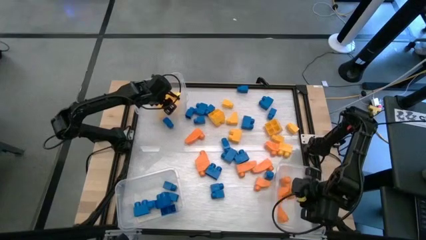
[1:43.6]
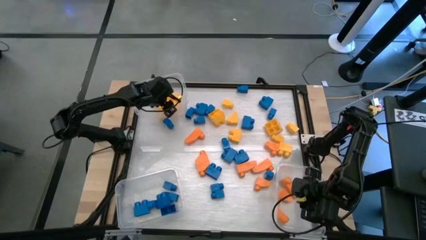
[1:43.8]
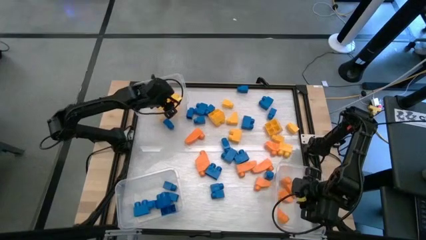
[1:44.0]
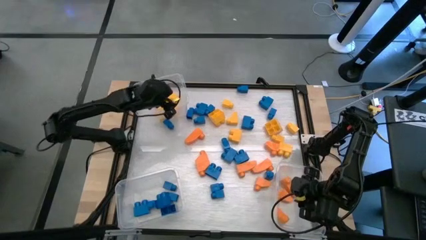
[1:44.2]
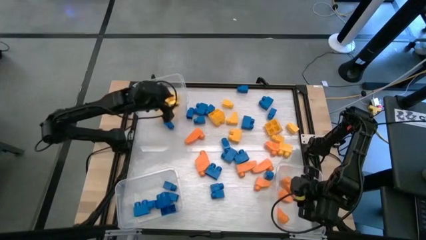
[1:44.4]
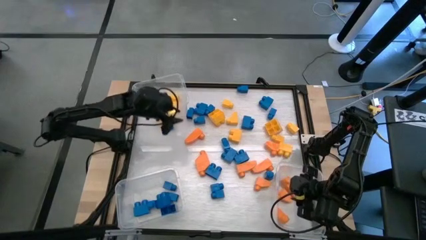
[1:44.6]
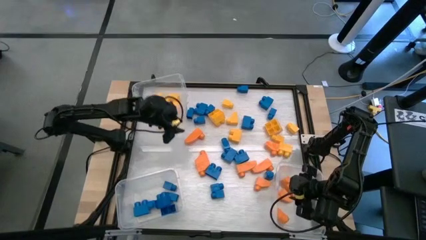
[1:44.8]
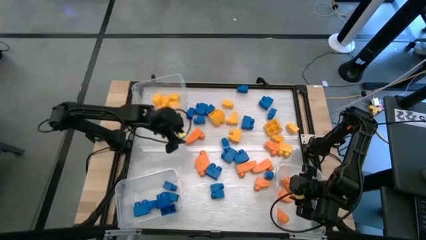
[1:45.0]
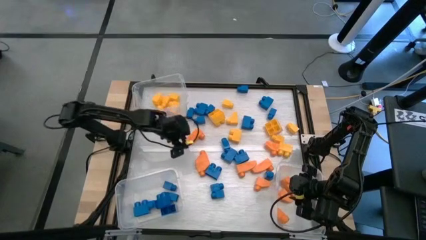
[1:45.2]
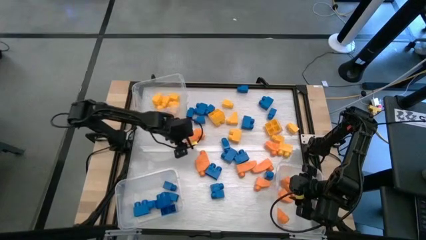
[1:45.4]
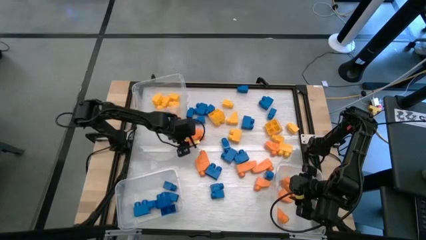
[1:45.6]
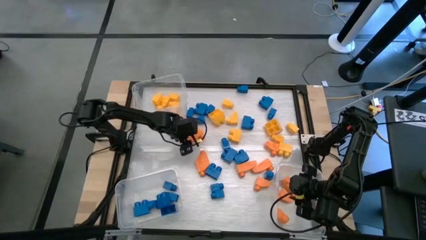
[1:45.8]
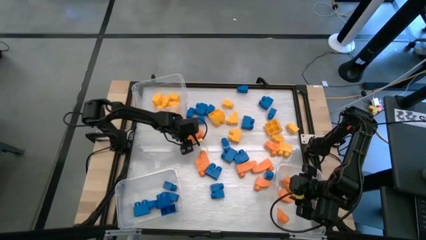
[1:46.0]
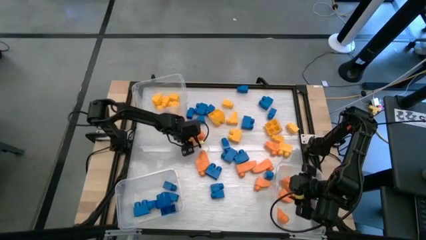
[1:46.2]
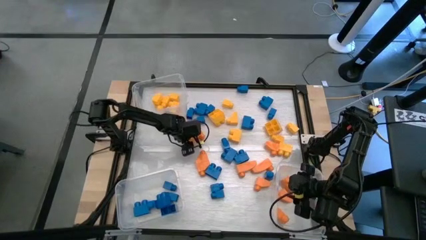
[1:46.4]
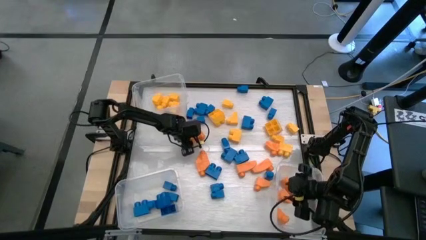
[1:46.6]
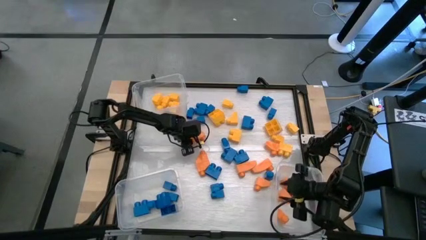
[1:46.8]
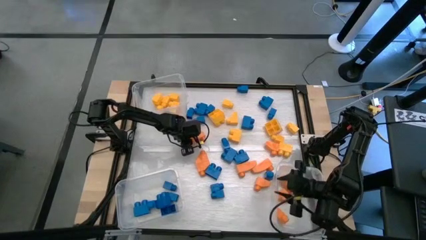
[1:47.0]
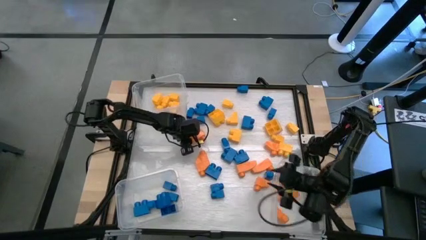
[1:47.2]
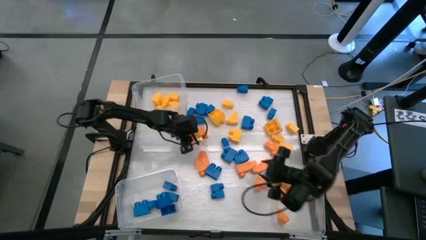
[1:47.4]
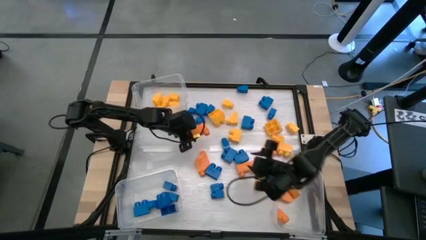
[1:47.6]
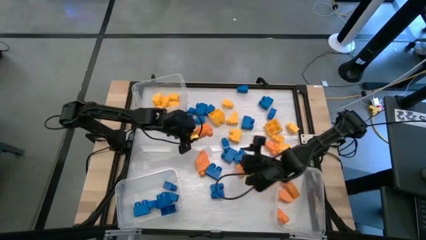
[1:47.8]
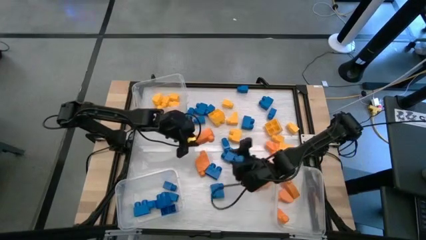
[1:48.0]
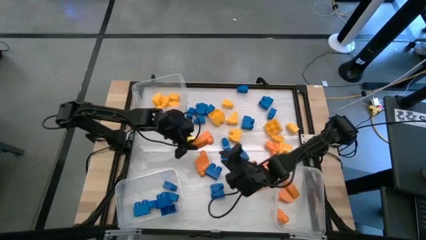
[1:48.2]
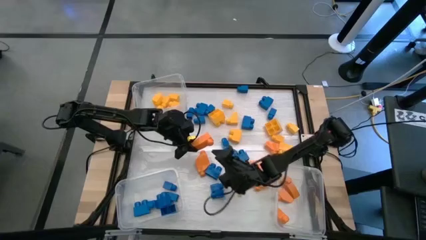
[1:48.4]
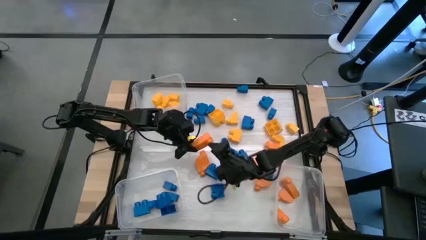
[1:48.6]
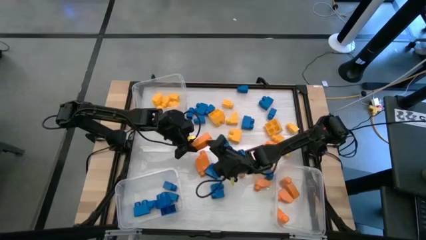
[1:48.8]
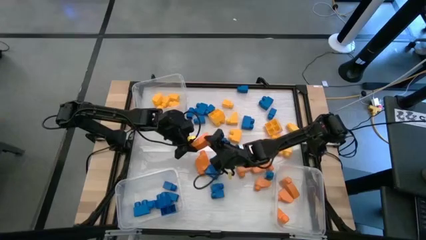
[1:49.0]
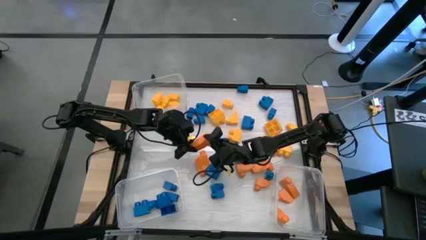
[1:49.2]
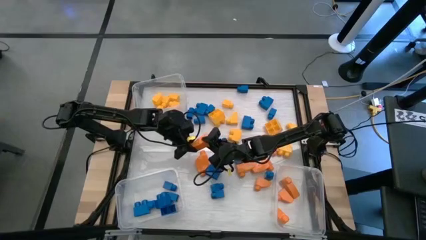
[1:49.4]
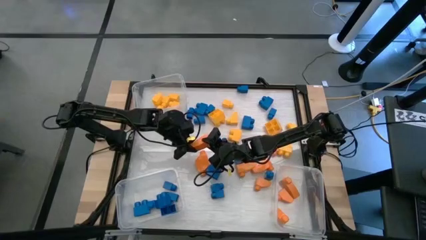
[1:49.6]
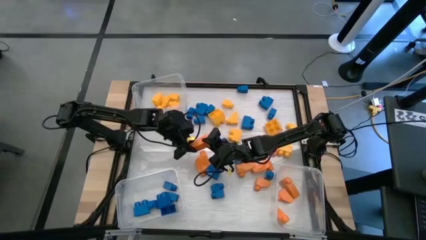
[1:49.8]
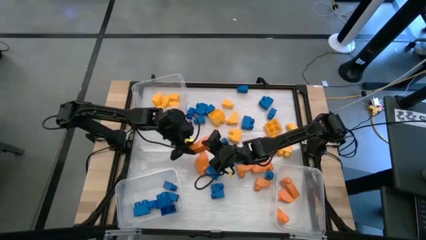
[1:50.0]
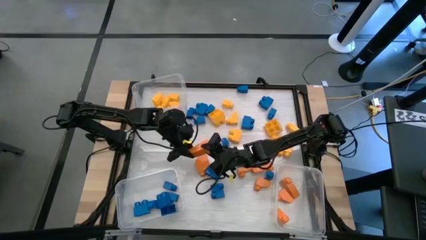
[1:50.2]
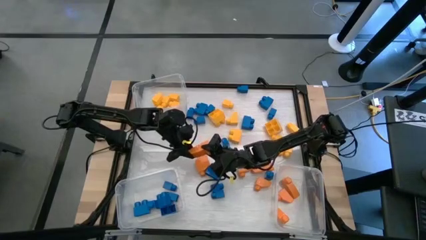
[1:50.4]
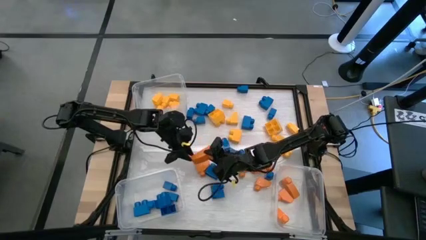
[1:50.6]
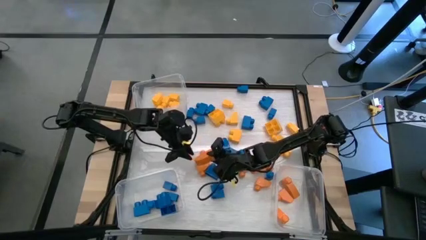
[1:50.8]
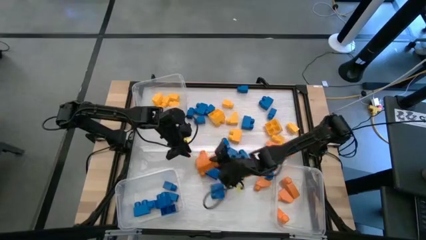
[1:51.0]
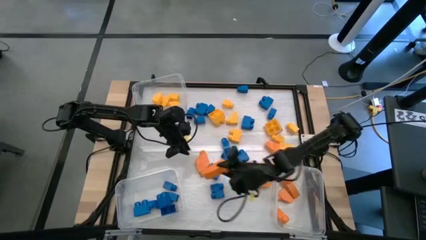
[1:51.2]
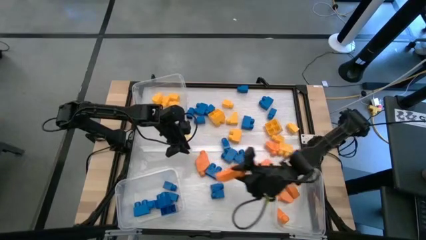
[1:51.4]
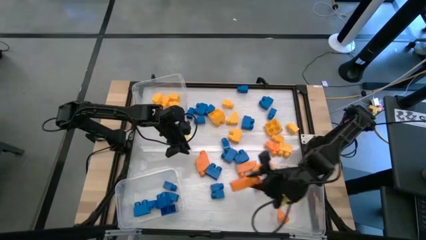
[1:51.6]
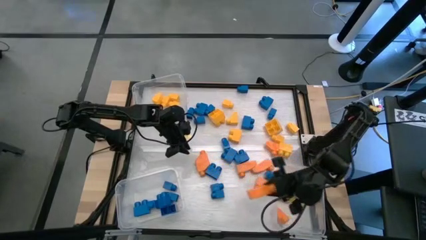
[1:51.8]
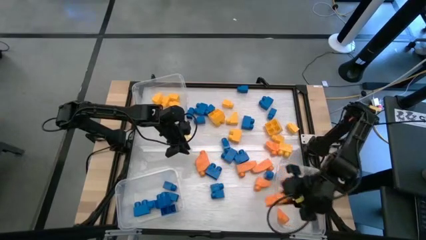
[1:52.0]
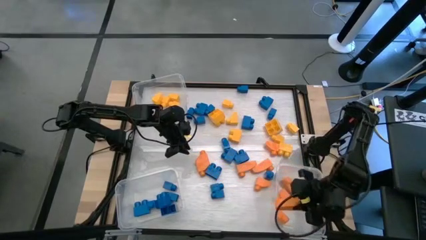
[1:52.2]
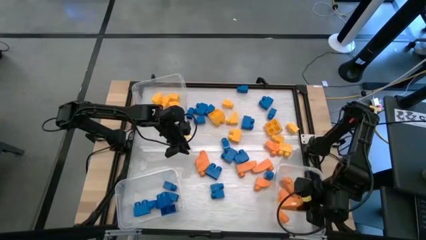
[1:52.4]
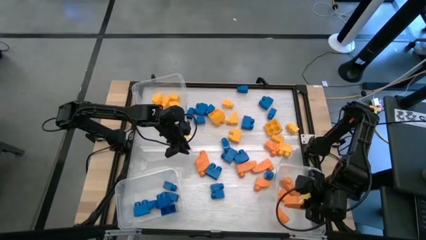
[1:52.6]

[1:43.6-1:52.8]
Task: Sort blocks
Put the orange game piece into the bottom right transparent bin

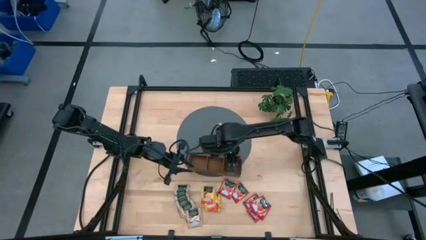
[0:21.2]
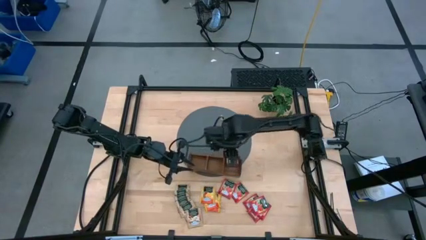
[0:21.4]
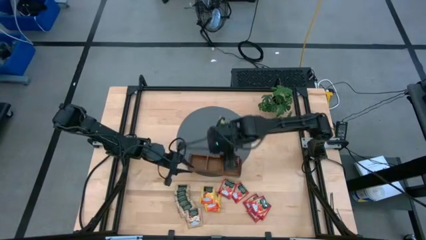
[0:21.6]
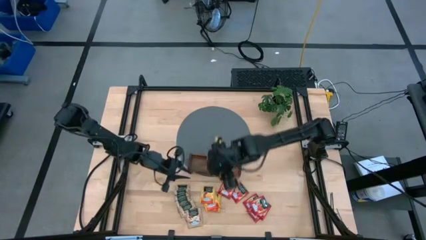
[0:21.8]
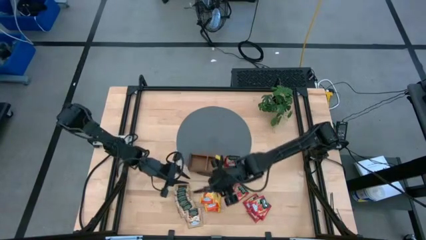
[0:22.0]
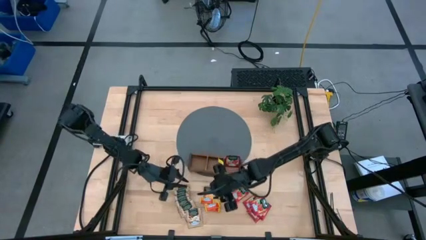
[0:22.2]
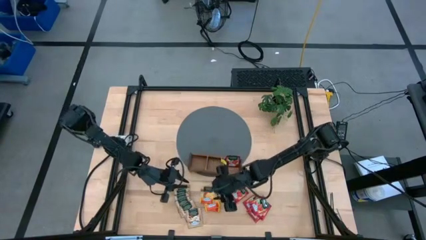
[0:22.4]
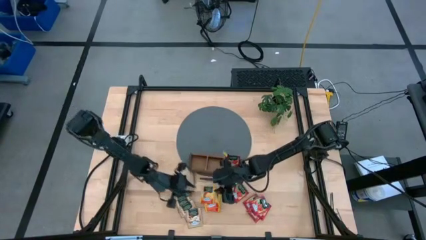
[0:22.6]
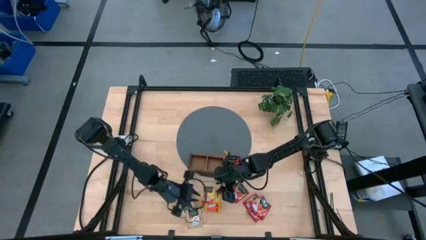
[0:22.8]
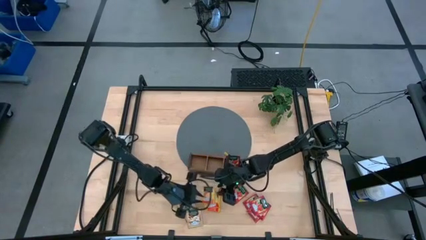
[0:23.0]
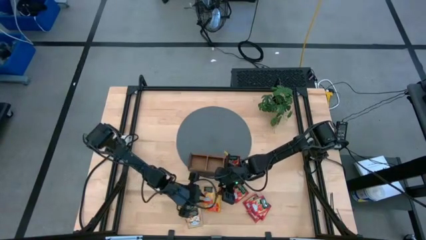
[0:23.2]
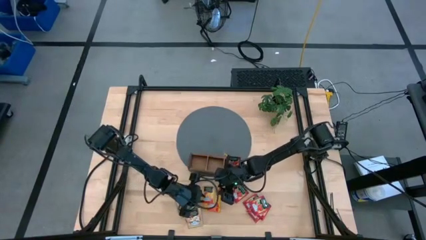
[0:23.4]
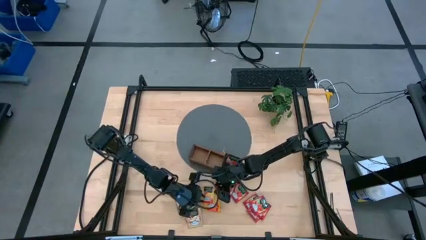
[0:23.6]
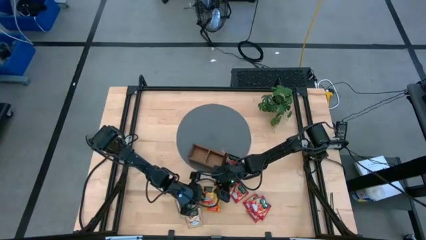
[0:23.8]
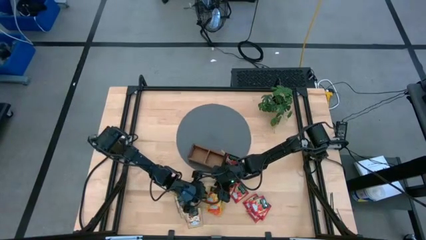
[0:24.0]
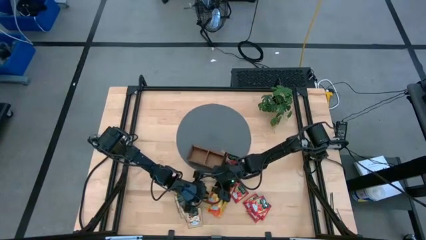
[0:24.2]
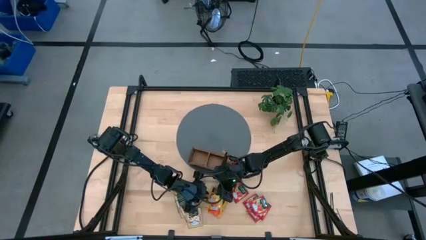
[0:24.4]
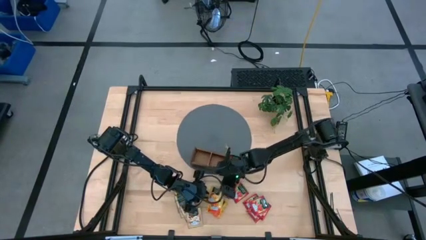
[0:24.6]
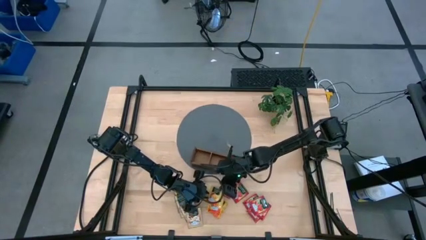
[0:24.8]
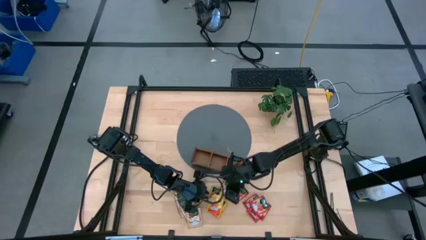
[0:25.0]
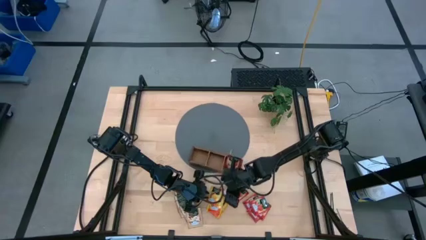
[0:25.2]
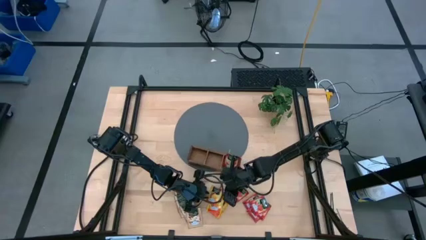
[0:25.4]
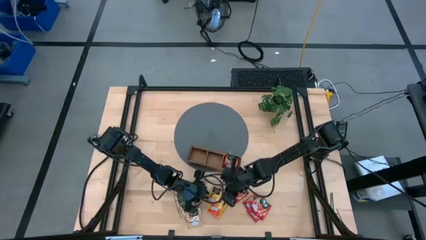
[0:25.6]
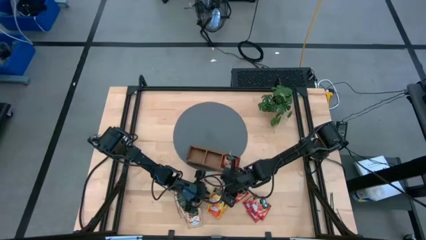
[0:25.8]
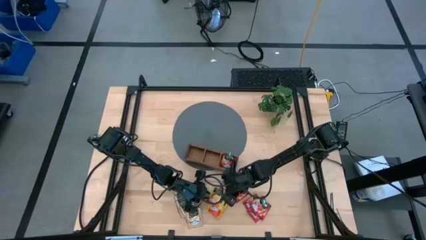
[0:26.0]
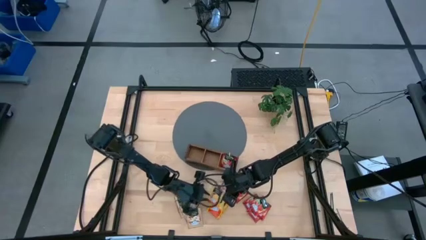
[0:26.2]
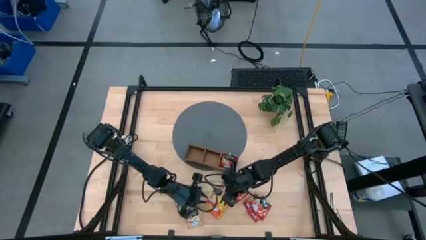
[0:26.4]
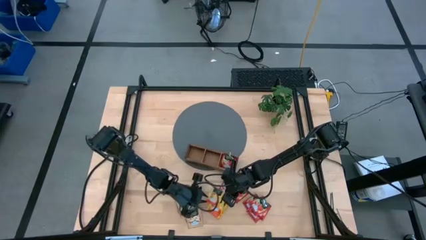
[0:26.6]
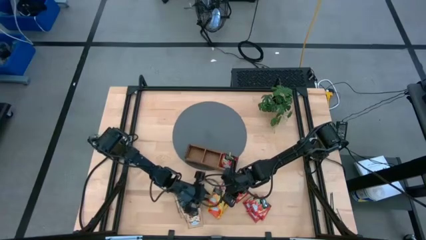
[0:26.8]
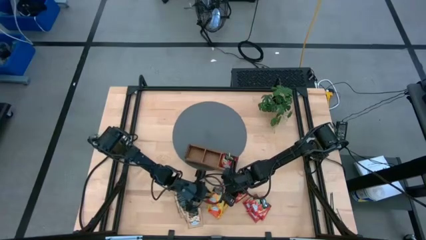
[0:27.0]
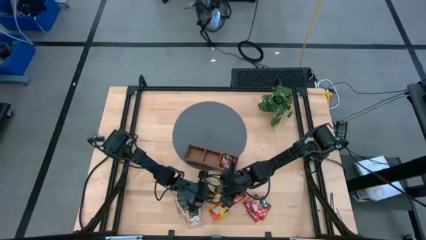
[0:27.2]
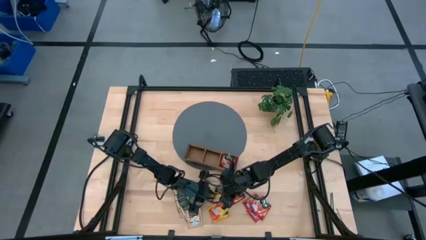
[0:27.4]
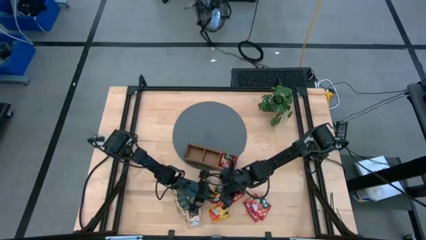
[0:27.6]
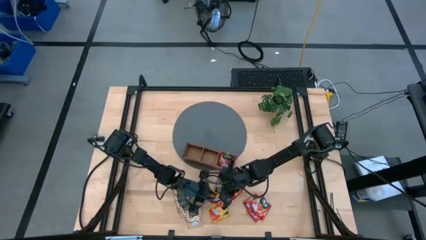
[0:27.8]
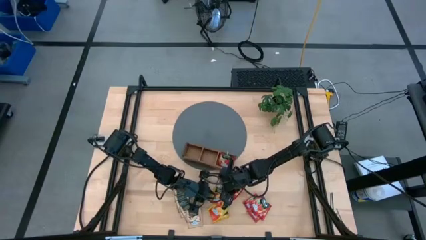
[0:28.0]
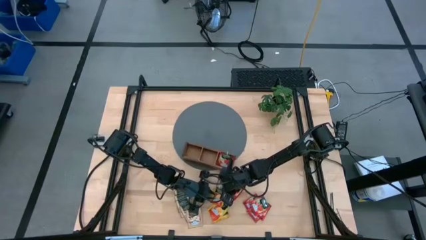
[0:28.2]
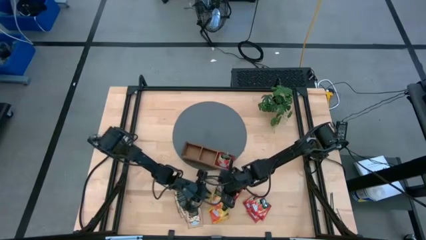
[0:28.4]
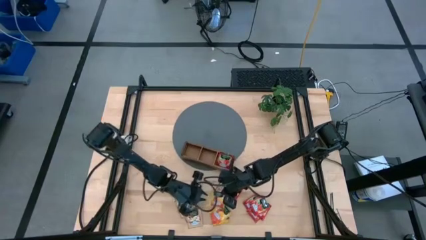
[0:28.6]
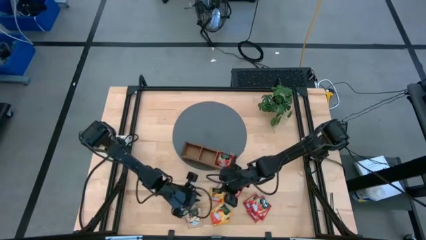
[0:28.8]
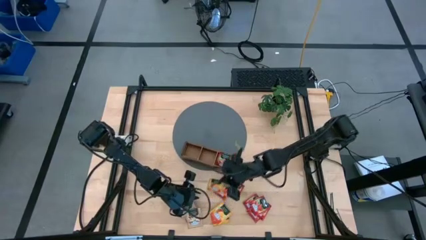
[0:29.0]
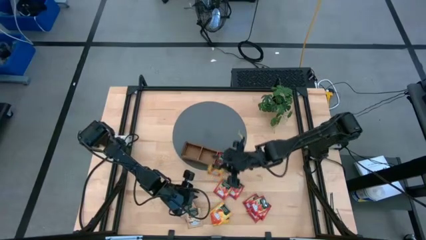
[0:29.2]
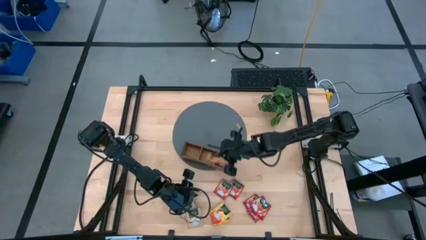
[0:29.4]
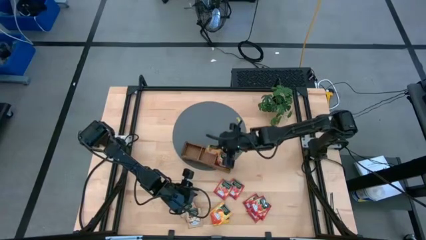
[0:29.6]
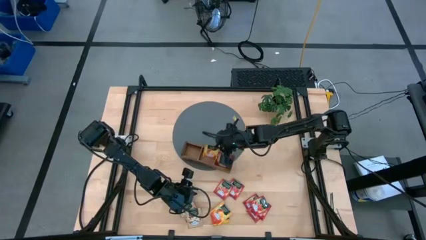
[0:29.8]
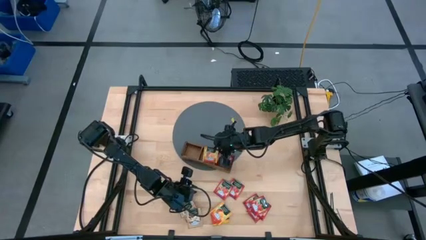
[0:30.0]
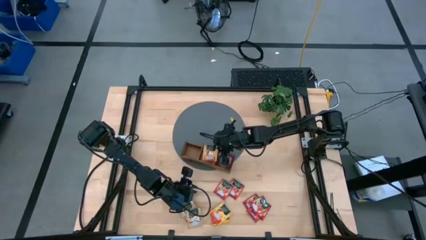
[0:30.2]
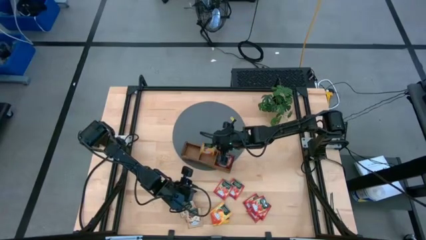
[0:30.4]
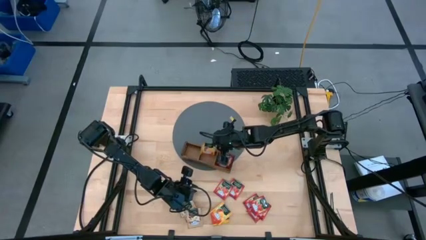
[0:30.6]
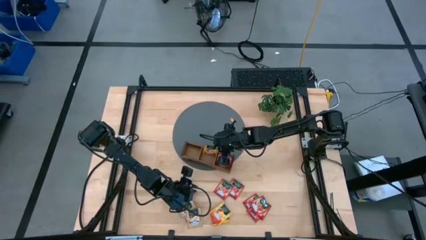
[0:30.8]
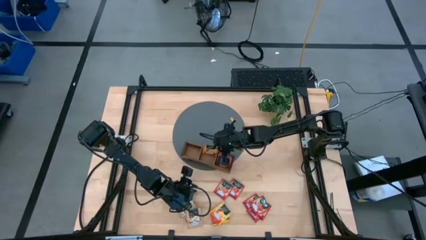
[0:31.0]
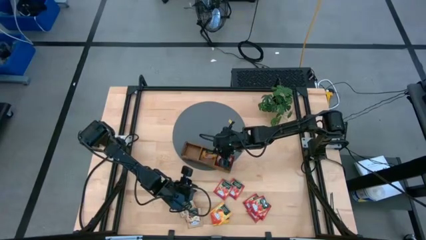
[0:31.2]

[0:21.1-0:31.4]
Task: Pick & Place Tea
Put the yellow tea bag into the middle section of the wooden organizer
